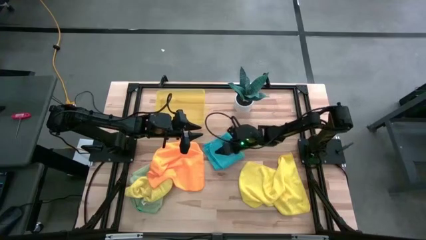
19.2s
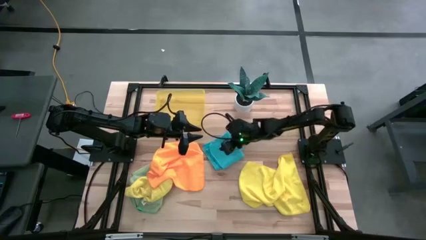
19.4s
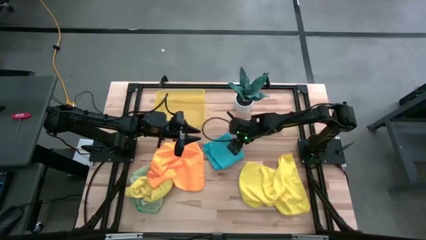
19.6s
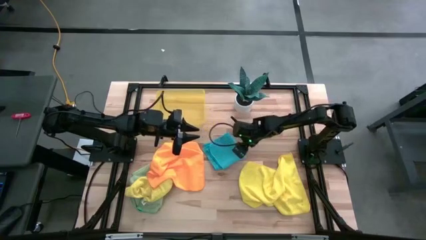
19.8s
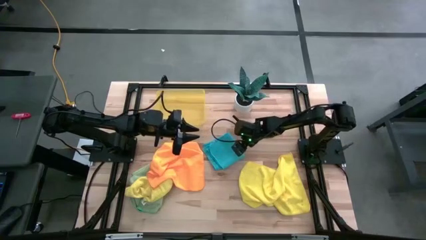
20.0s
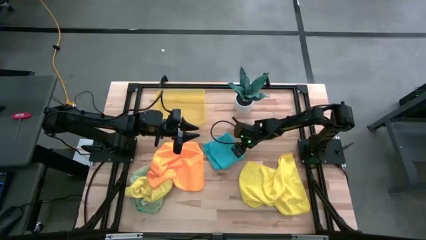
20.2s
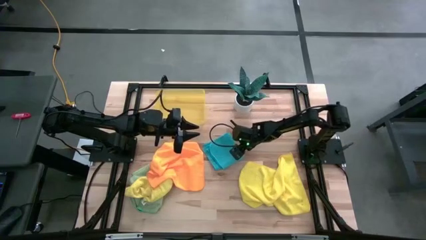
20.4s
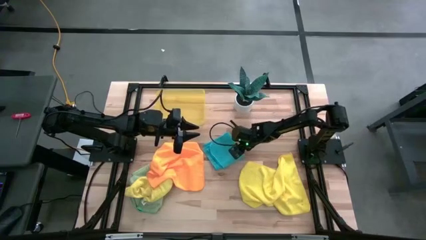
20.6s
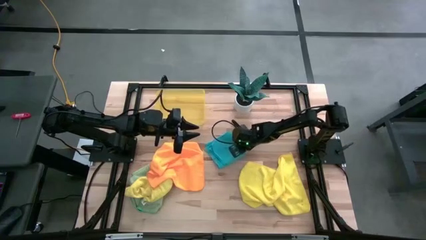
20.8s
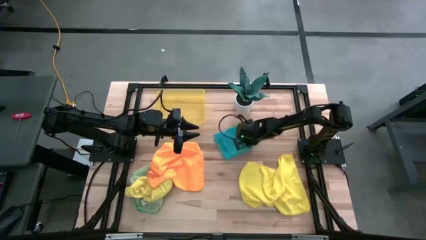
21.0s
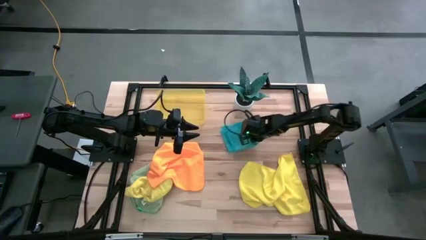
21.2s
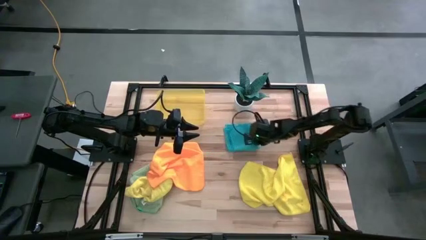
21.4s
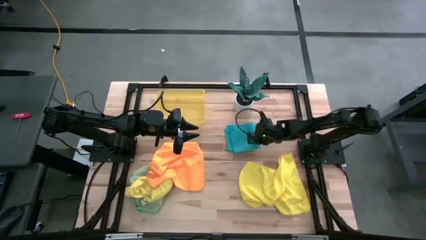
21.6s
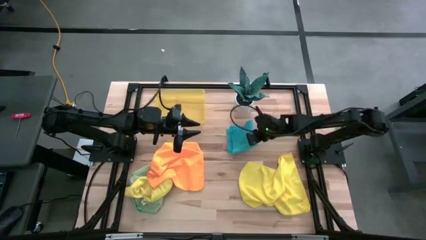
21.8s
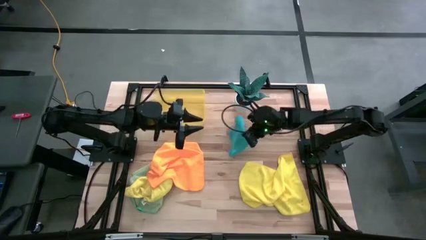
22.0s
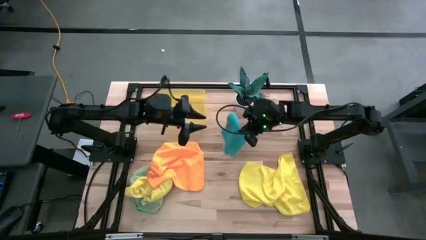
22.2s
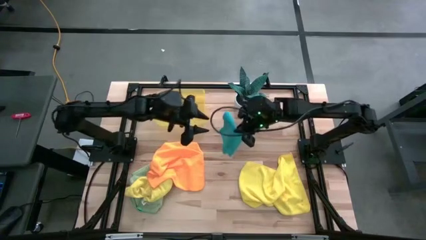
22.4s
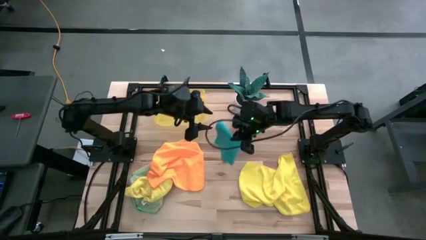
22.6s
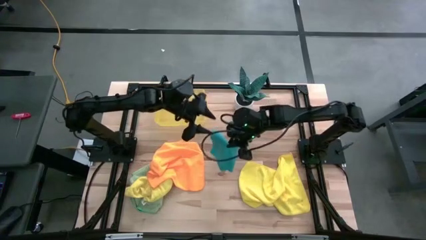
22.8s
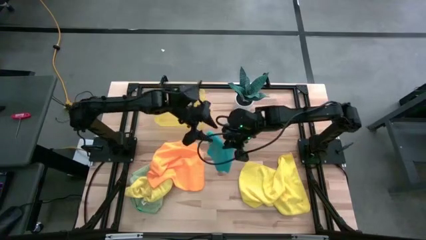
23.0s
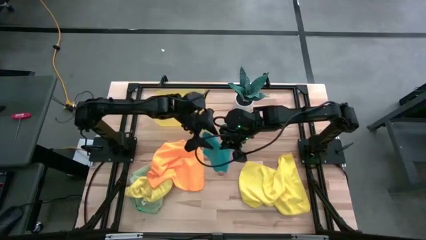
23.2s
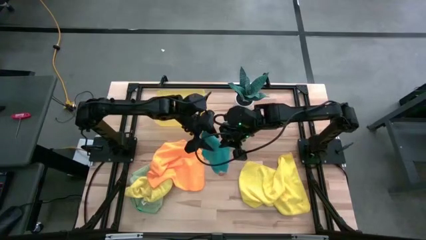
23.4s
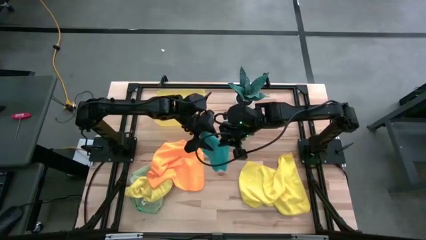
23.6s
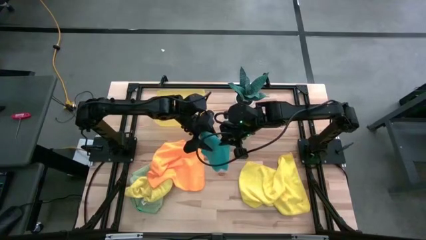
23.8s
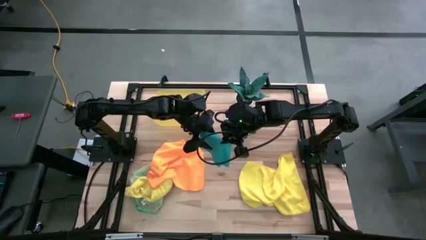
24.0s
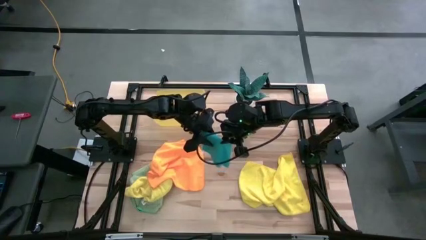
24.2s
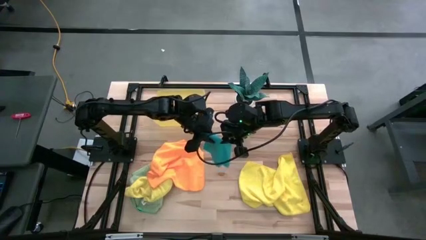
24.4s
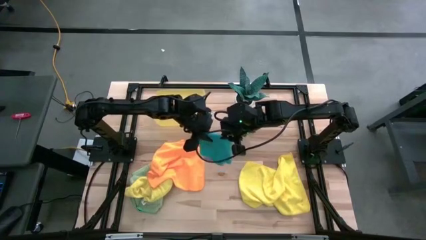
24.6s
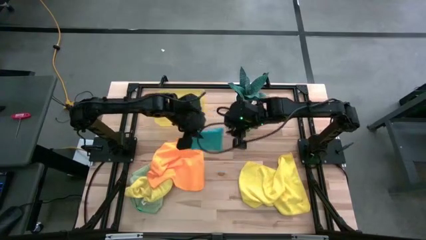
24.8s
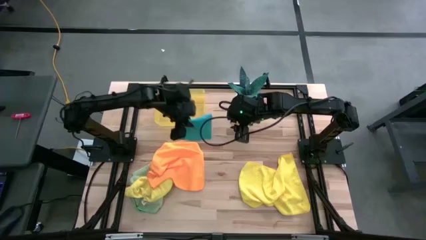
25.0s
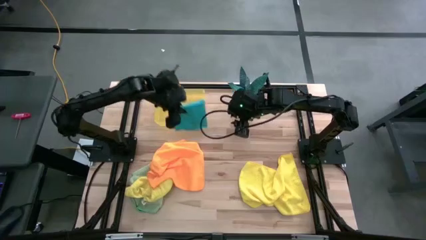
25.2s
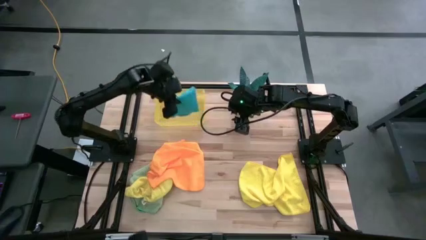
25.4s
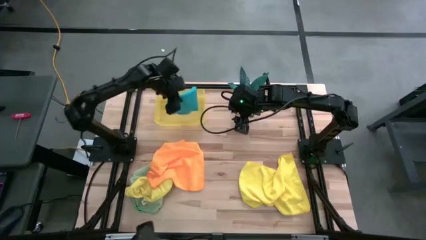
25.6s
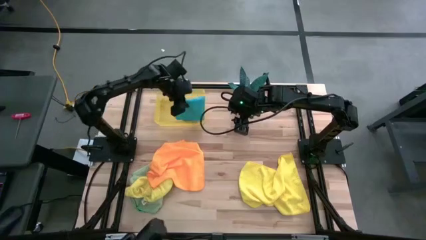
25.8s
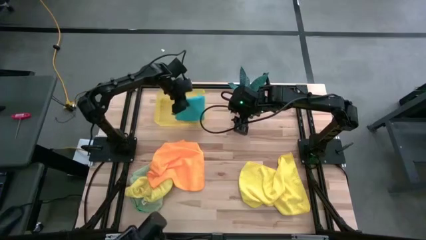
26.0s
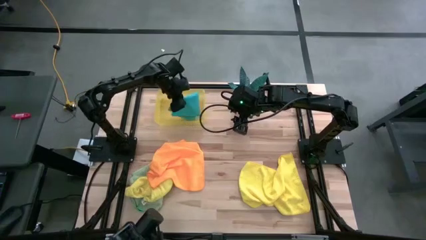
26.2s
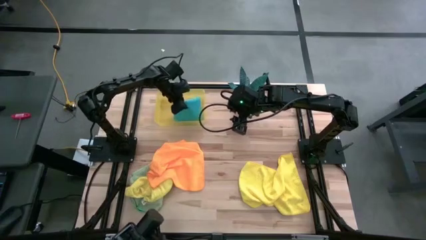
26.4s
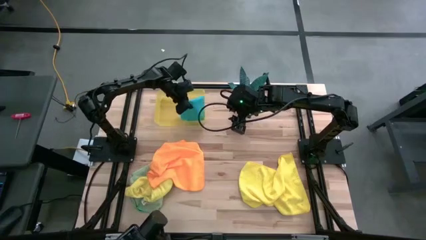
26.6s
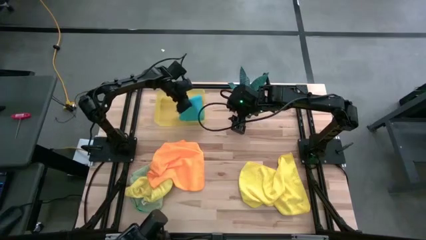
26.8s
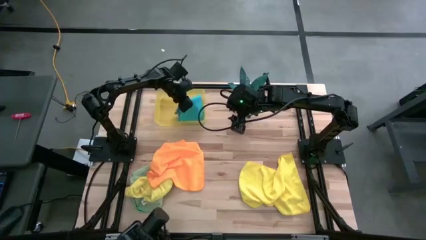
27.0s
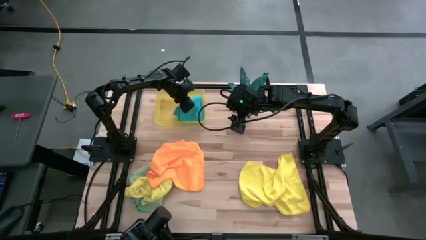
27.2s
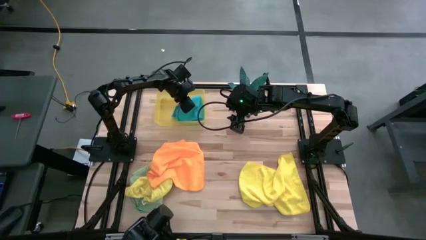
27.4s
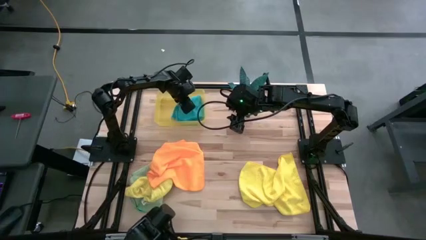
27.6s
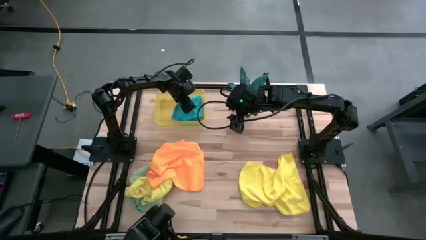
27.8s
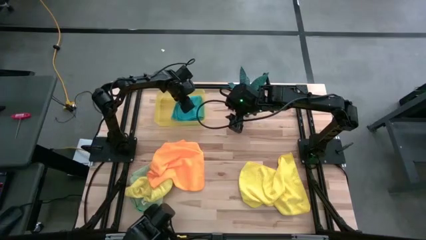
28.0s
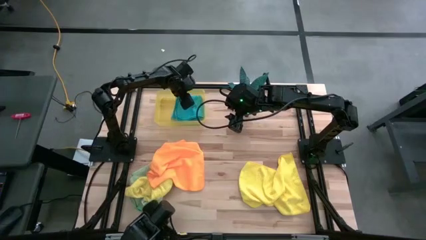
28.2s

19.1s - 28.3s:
Task: Fold microfiber towels
Put the folded blue microfiber cloth into the bin
